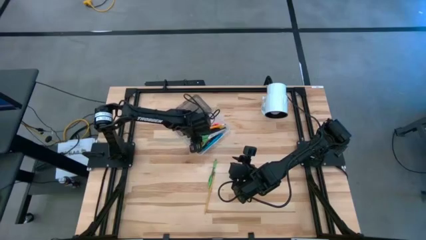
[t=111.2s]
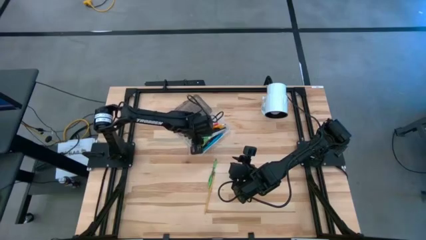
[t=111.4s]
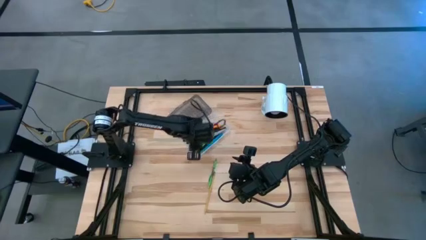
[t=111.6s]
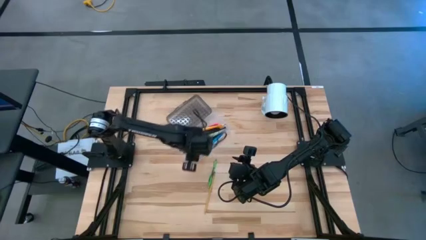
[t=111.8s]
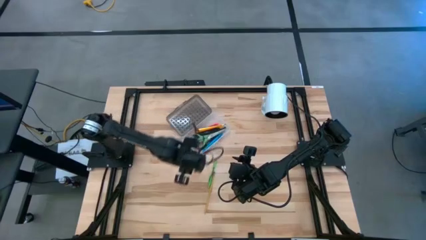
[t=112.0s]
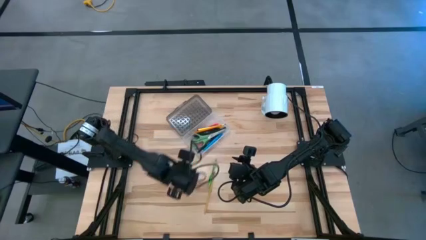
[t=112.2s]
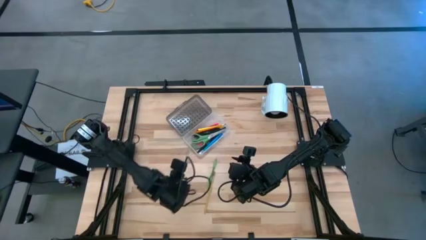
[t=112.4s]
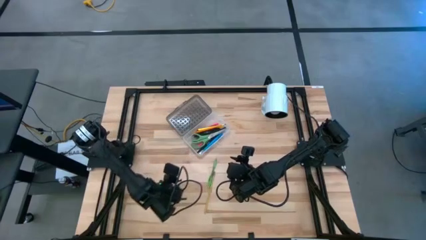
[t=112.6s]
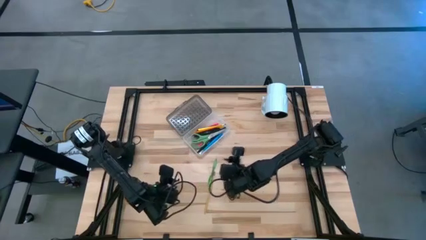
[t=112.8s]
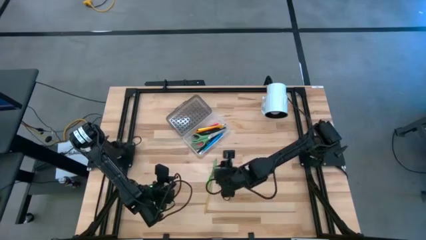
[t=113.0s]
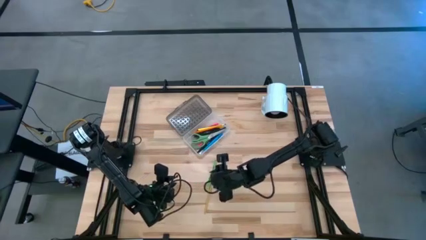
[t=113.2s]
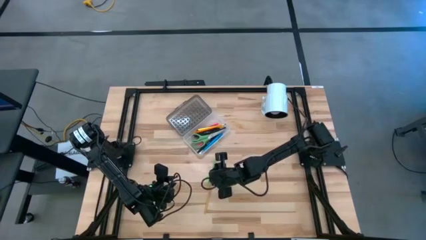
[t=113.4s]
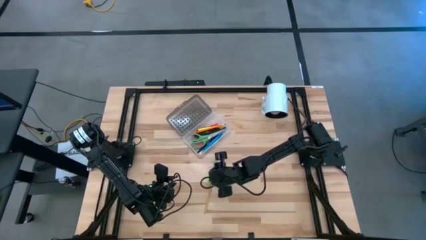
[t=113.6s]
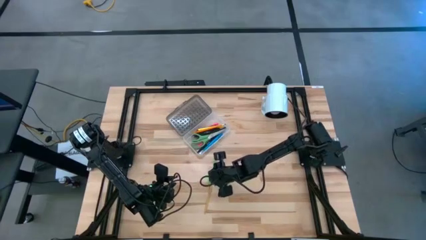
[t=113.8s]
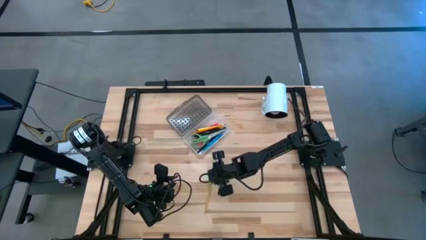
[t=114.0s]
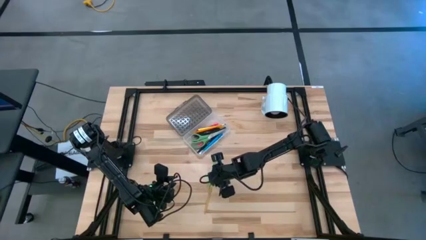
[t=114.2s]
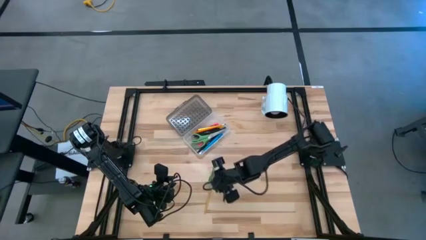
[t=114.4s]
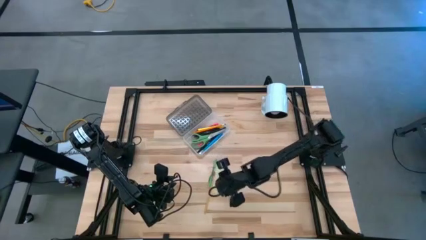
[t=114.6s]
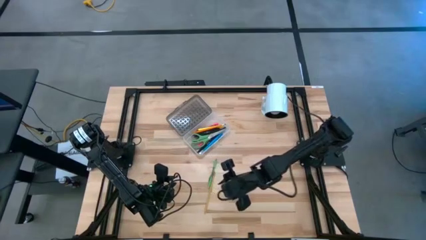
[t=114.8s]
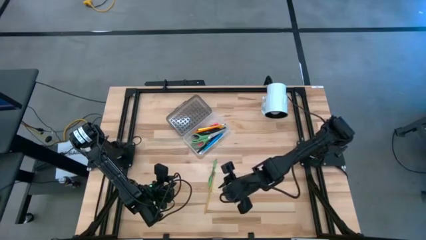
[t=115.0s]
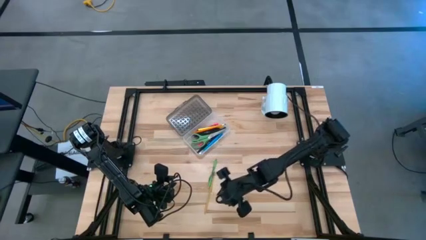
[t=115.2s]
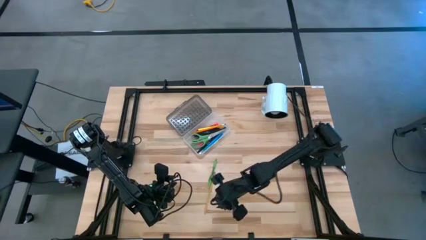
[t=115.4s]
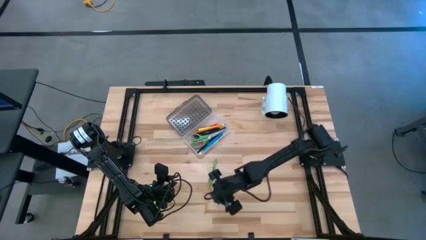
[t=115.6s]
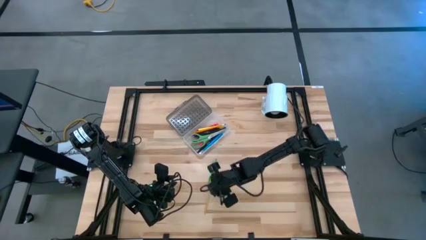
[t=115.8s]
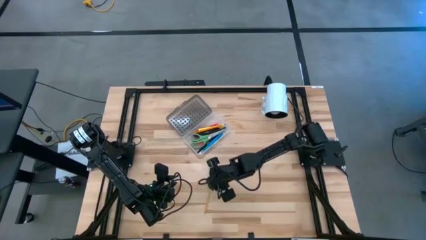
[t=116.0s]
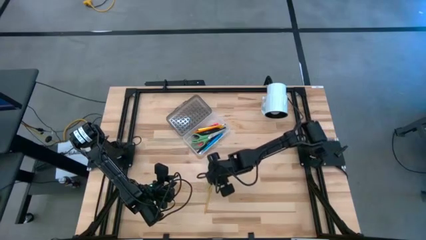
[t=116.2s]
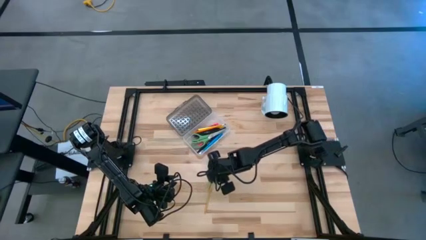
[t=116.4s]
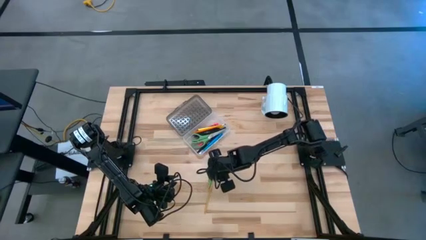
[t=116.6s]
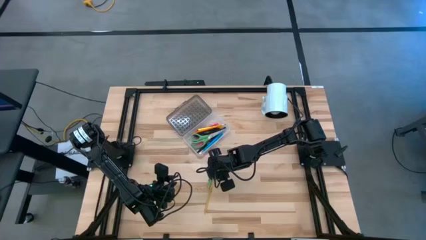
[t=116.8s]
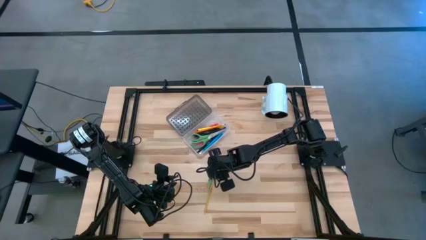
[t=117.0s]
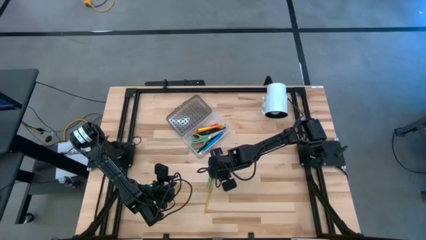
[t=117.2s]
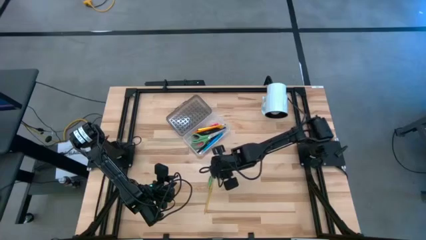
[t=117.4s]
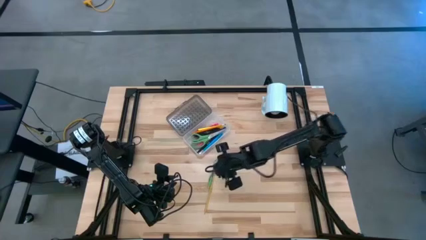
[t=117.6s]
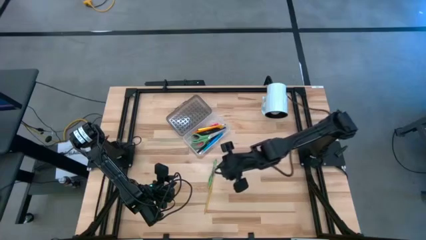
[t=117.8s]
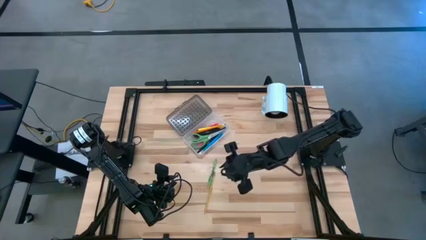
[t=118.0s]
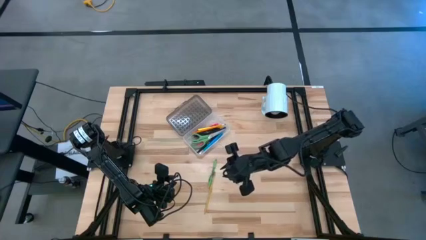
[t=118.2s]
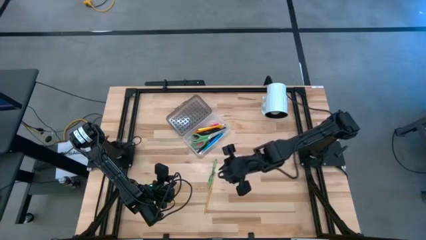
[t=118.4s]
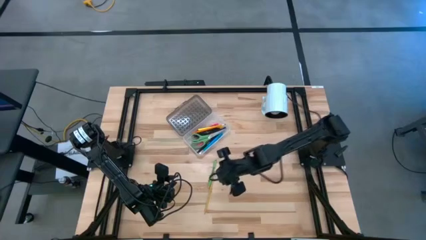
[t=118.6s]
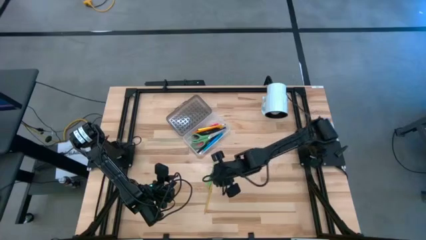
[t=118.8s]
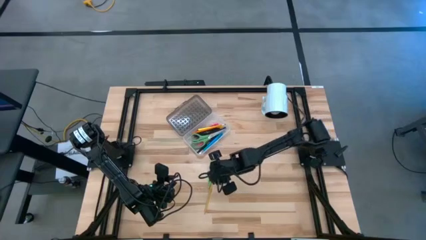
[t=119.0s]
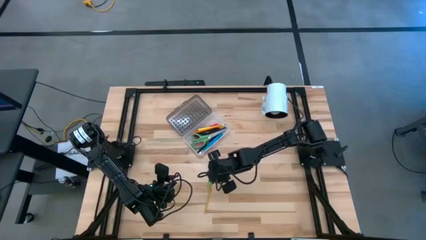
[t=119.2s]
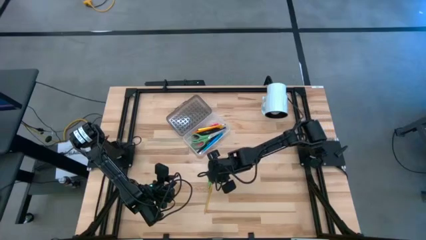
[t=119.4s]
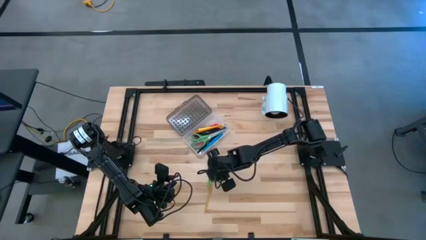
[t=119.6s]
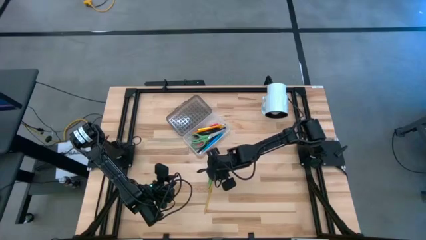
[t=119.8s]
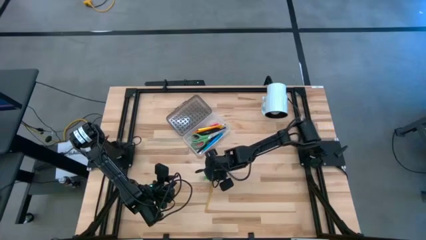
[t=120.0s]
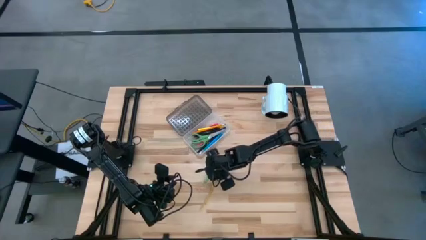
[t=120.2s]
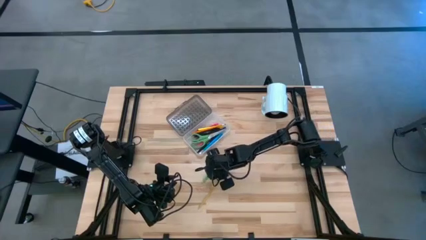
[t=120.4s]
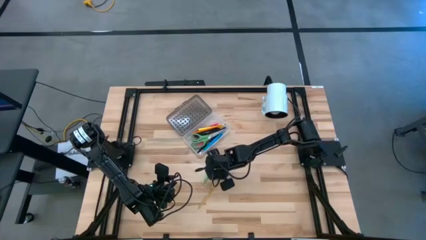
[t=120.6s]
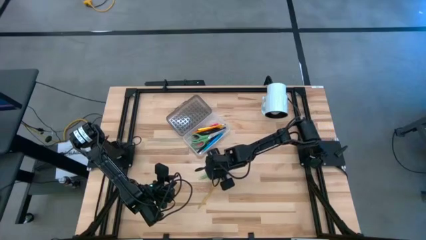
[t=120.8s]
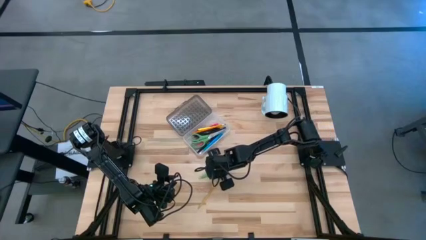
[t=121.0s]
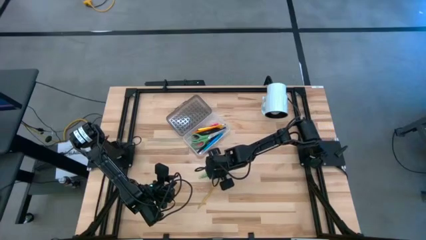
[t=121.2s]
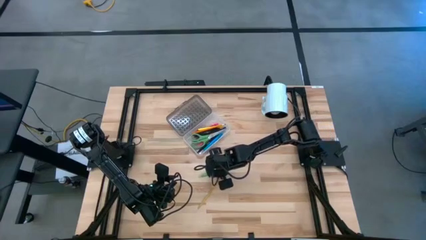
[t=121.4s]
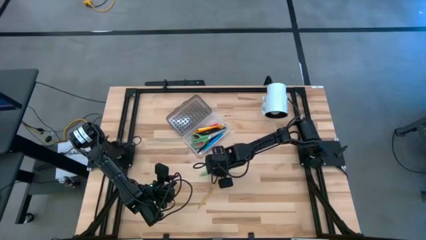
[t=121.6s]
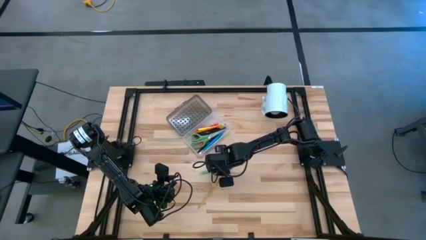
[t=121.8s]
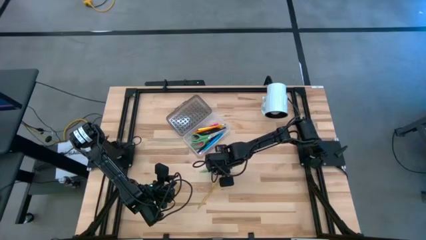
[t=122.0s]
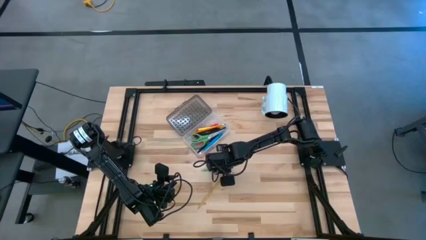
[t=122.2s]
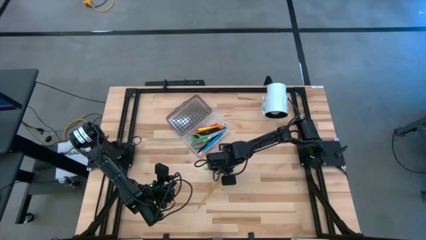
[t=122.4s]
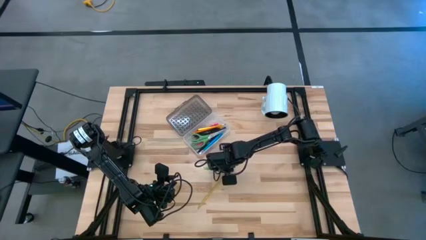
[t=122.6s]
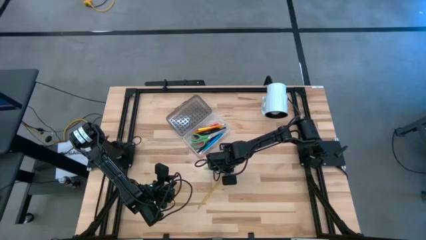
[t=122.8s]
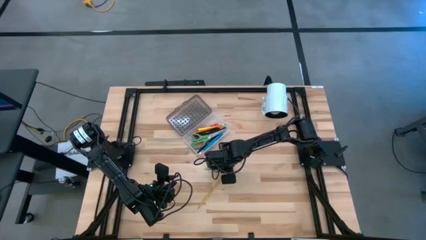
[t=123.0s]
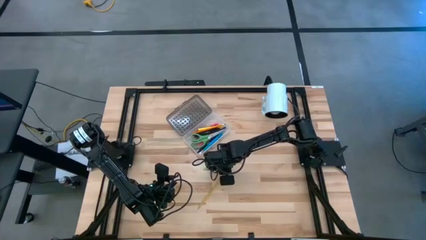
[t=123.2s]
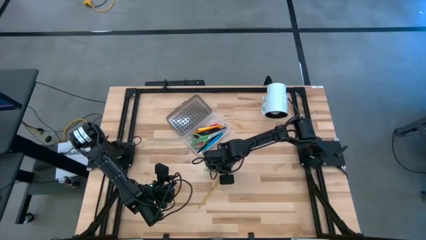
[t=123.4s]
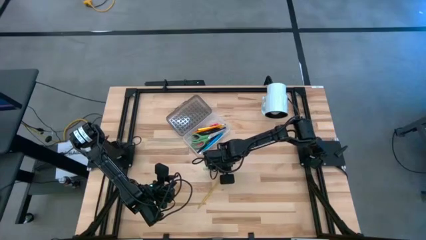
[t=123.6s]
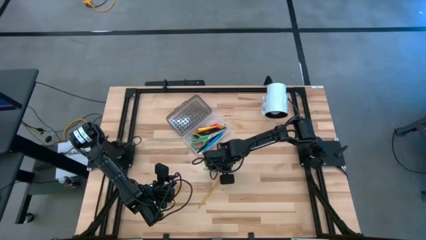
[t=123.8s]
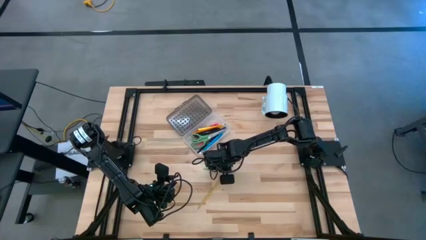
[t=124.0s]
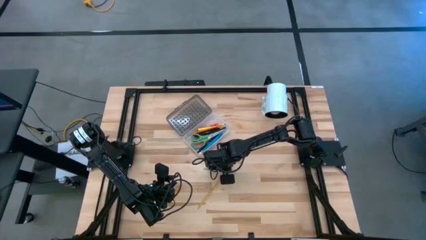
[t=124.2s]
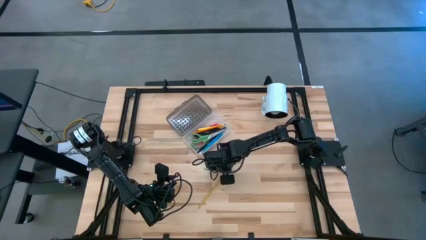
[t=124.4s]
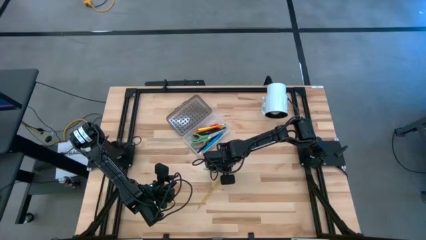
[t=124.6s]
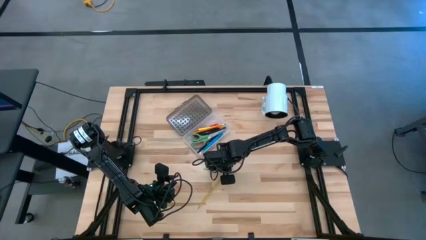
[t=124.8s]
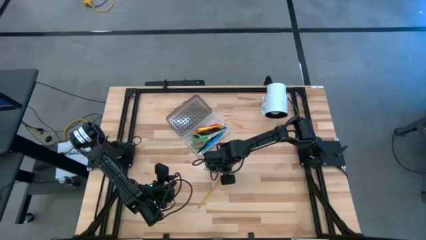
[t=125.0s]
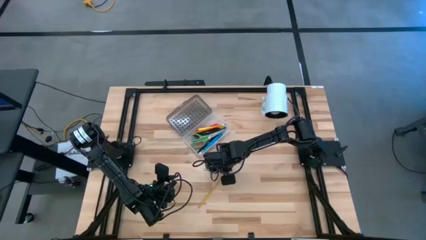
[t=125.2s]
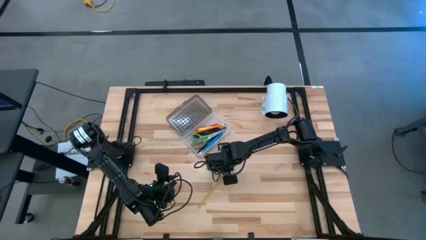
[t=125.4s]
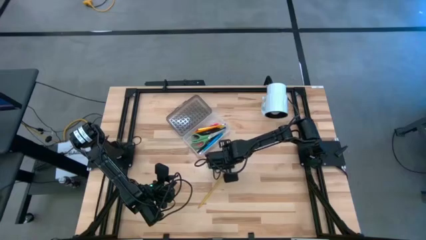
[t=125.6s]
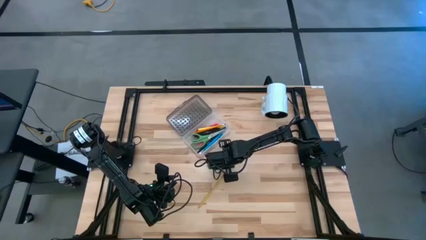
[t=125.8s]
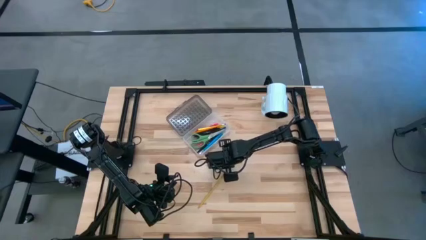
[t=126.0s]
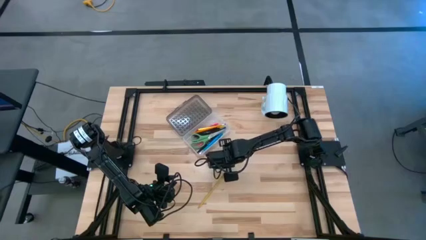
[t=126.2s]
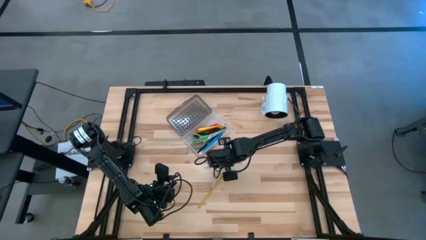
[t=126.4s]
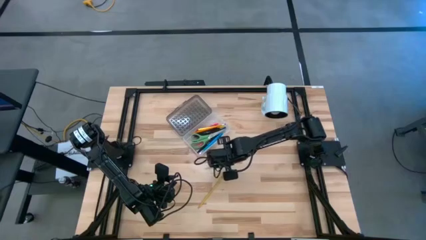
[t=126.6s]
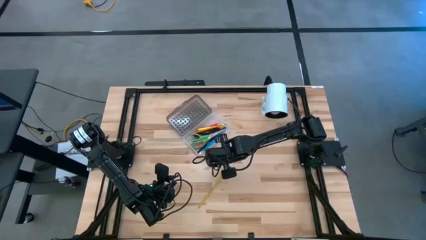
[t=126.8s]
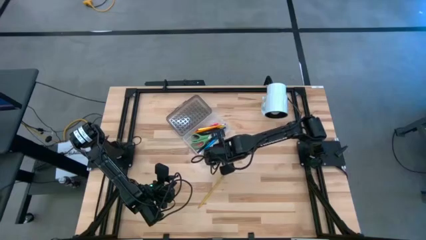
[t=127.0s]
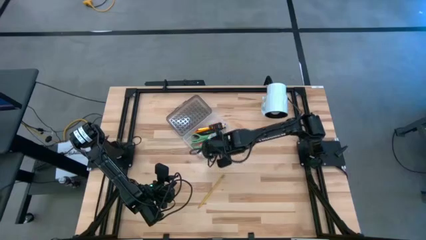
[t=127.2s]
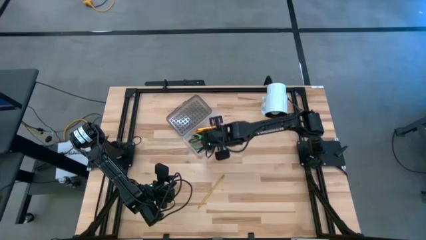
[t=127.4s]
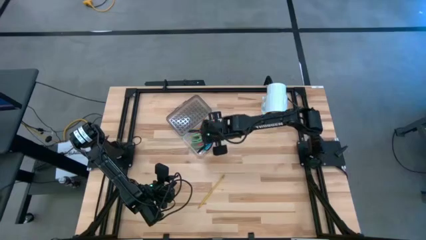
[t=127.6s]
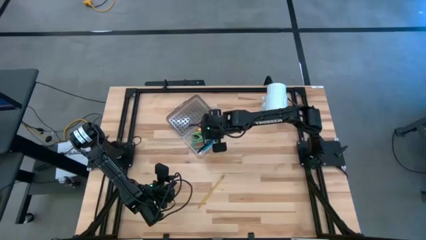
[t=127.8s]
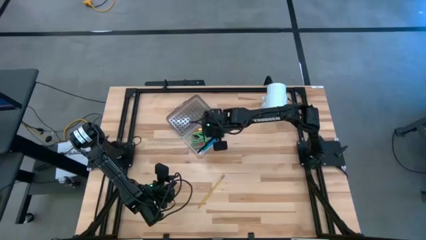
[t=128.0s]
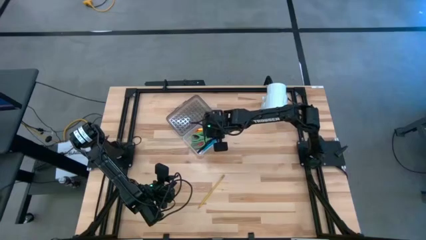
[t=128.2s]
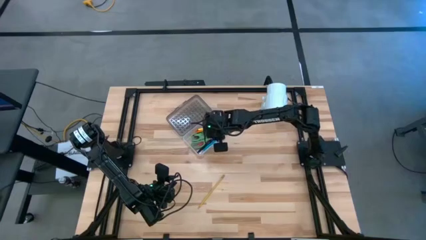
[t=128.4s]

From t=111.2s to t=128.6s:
Task: Pick & place school supplies into a supply box
Put the green pen into the transparent supply box
